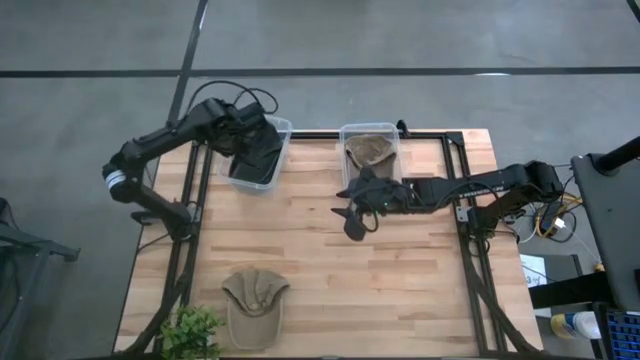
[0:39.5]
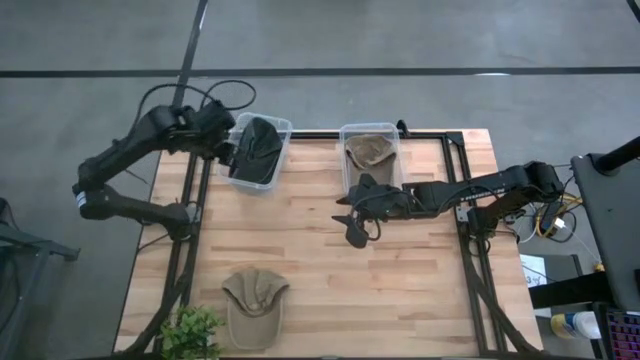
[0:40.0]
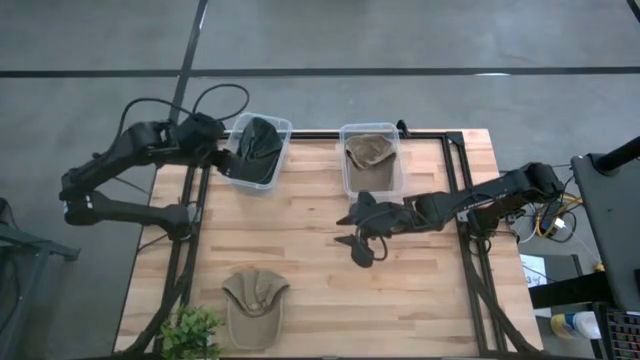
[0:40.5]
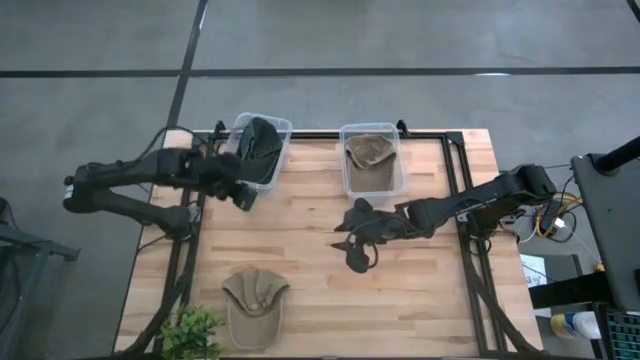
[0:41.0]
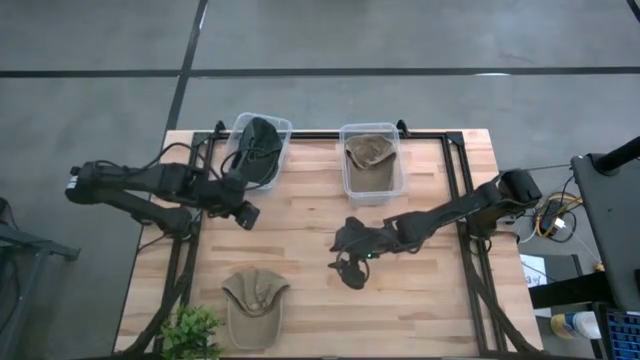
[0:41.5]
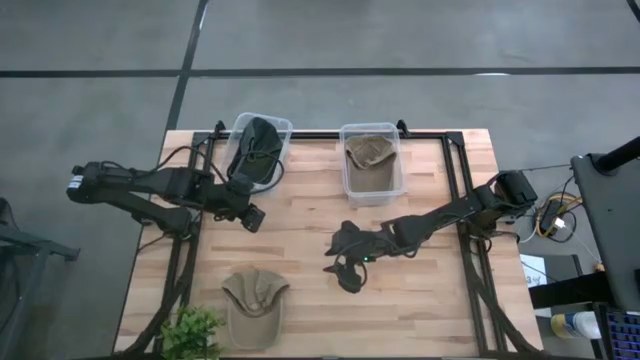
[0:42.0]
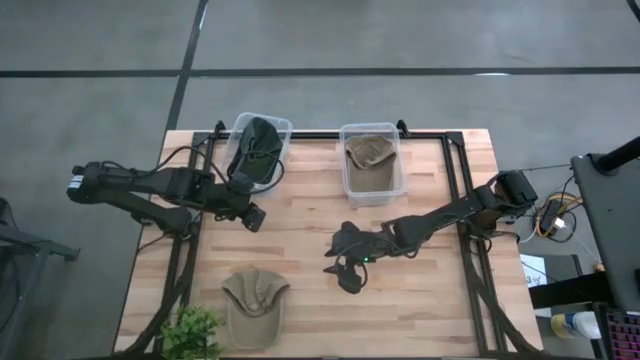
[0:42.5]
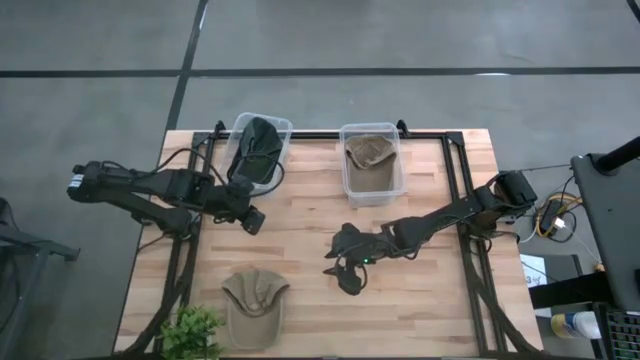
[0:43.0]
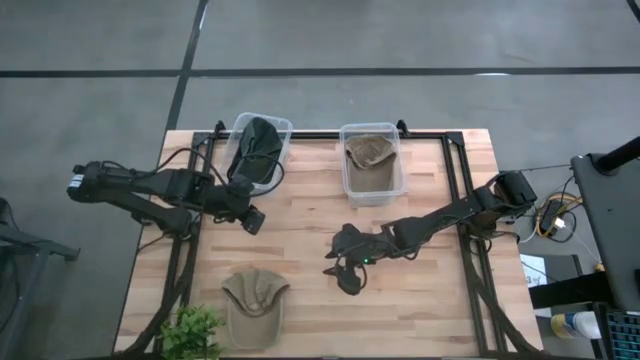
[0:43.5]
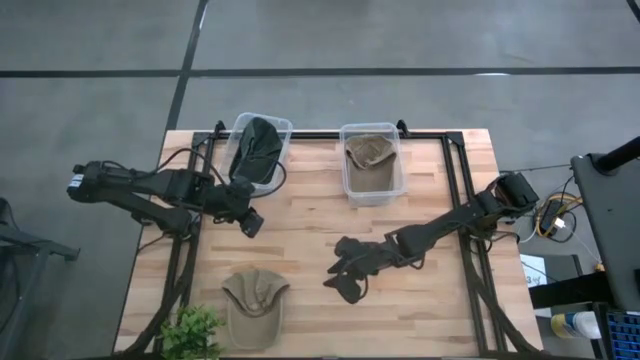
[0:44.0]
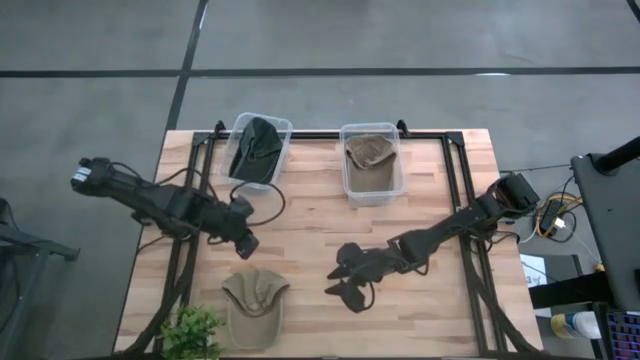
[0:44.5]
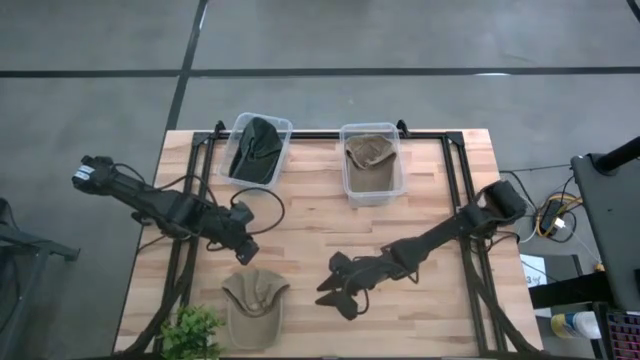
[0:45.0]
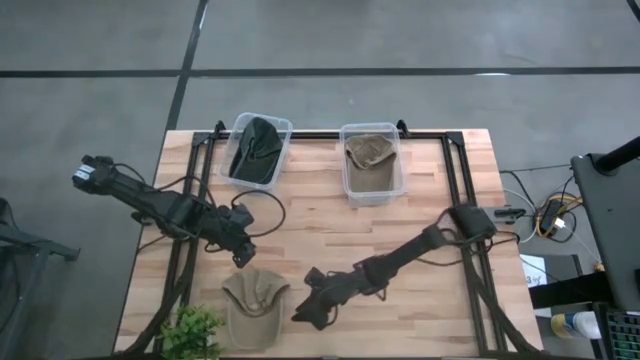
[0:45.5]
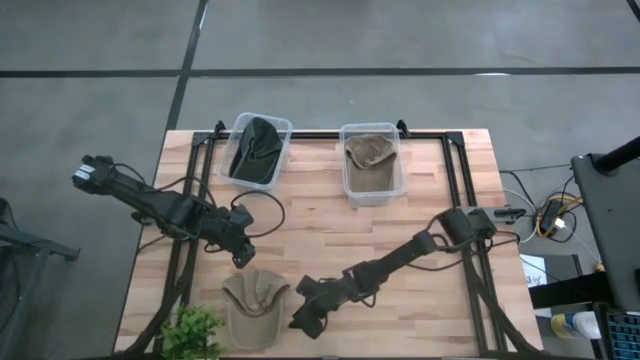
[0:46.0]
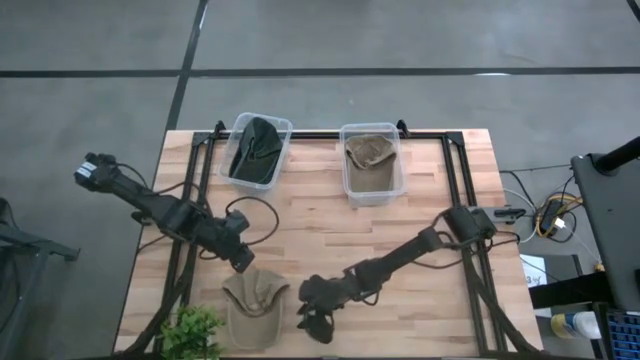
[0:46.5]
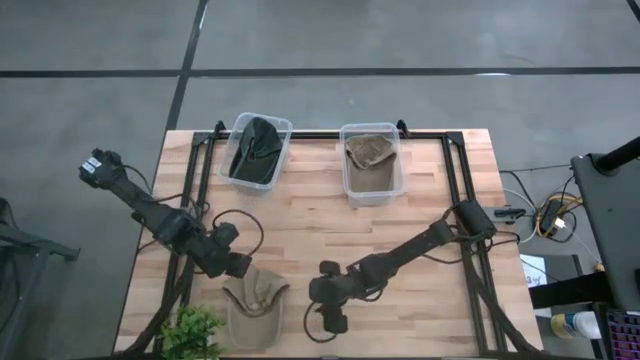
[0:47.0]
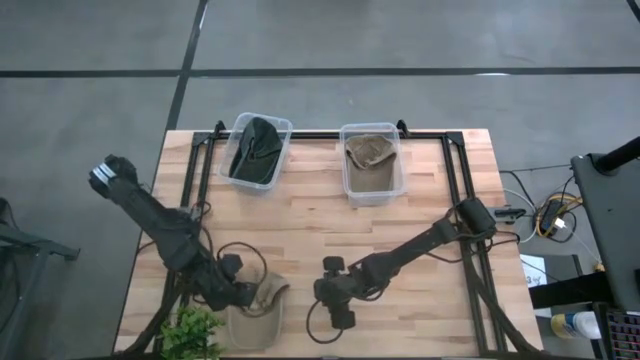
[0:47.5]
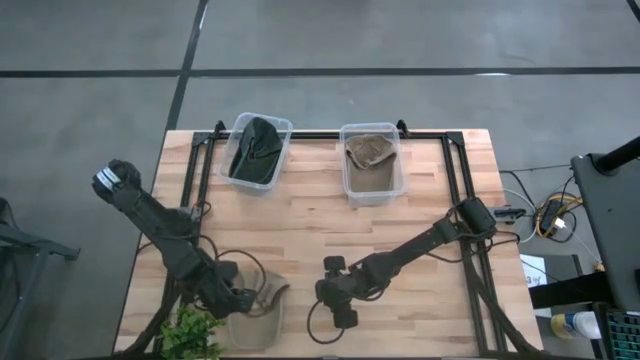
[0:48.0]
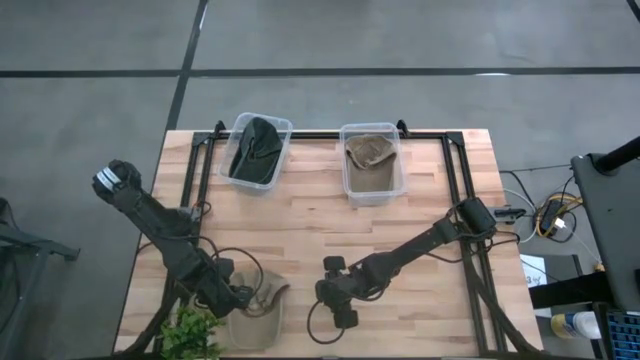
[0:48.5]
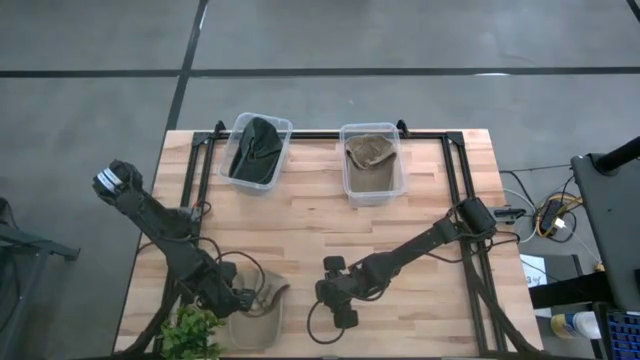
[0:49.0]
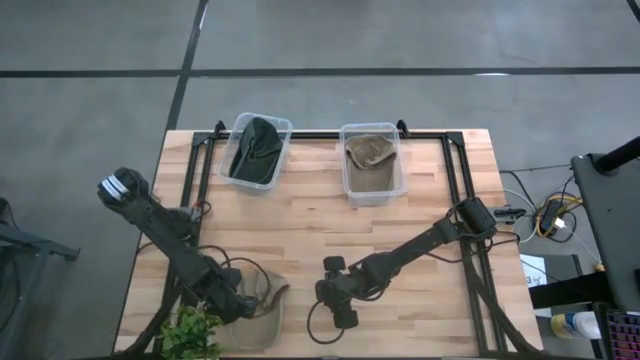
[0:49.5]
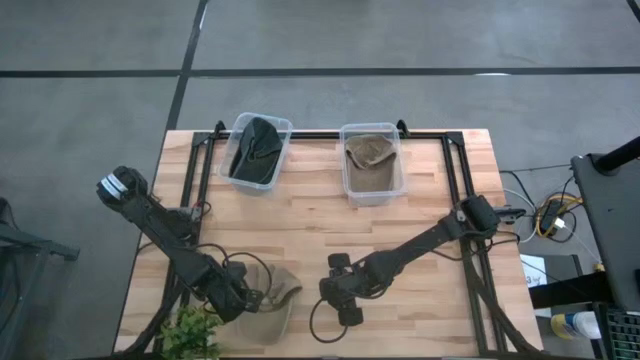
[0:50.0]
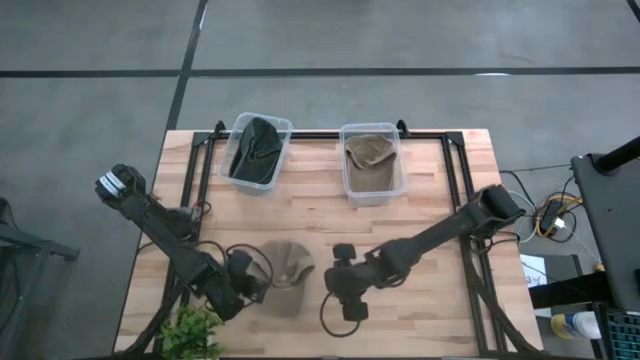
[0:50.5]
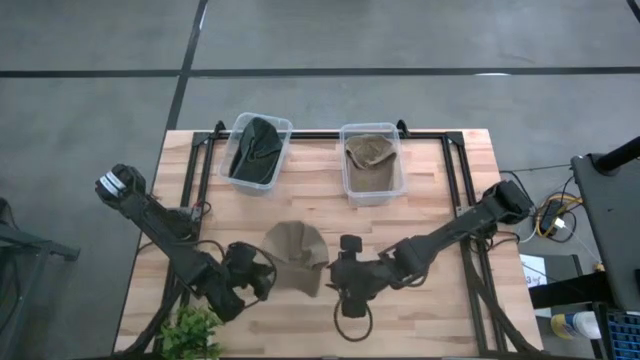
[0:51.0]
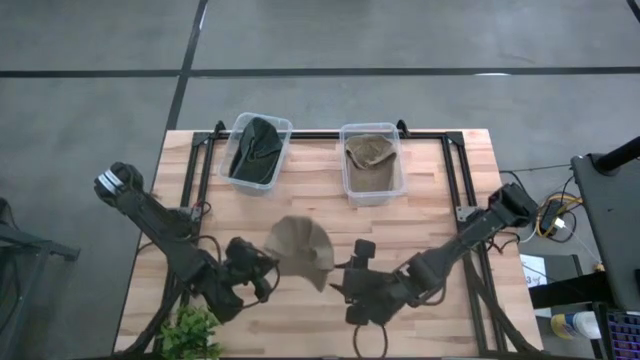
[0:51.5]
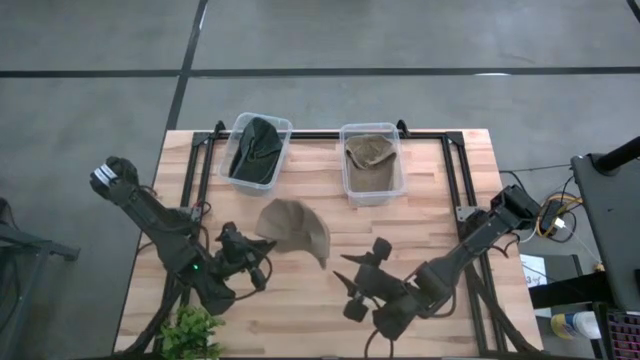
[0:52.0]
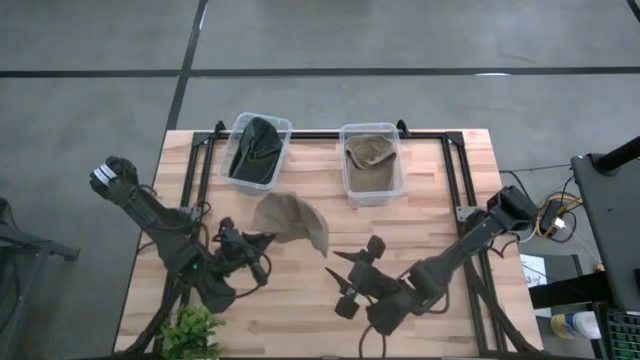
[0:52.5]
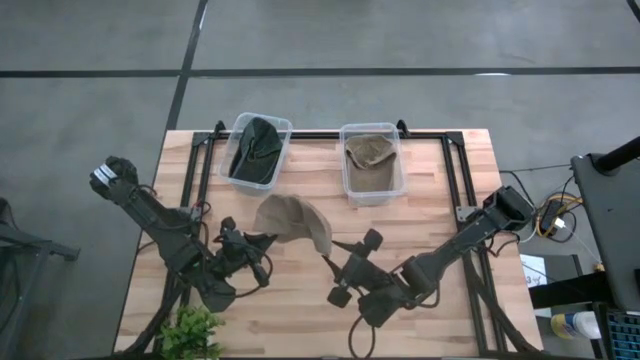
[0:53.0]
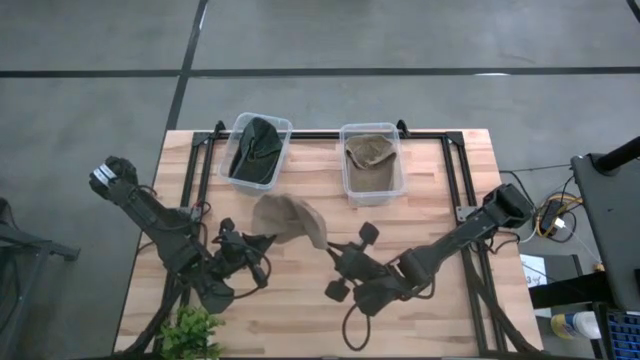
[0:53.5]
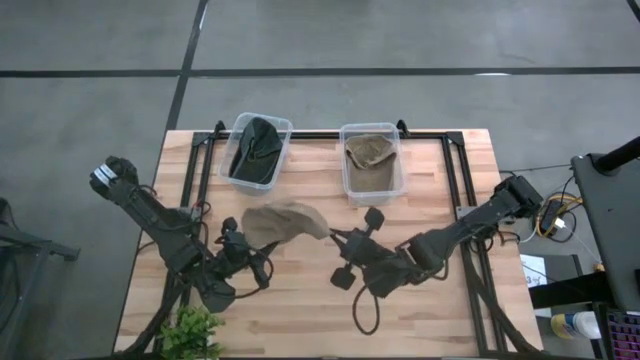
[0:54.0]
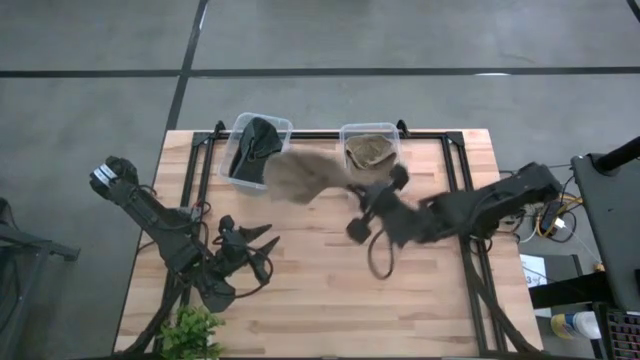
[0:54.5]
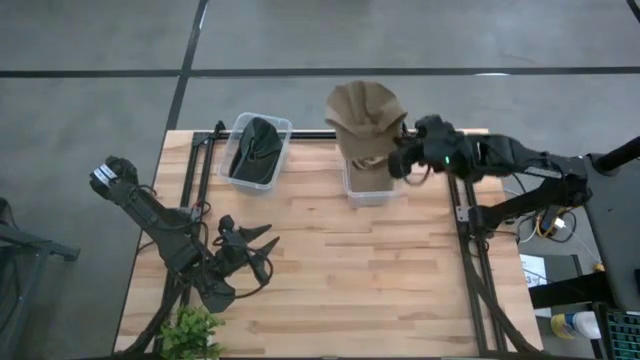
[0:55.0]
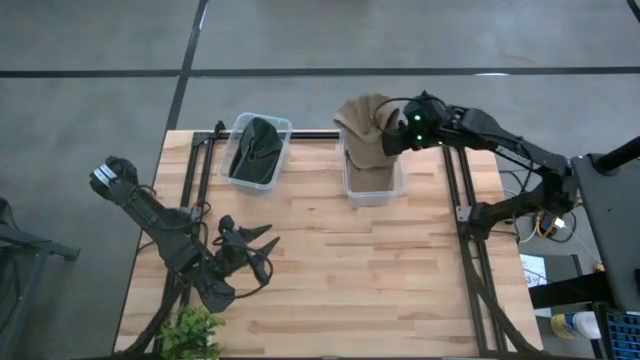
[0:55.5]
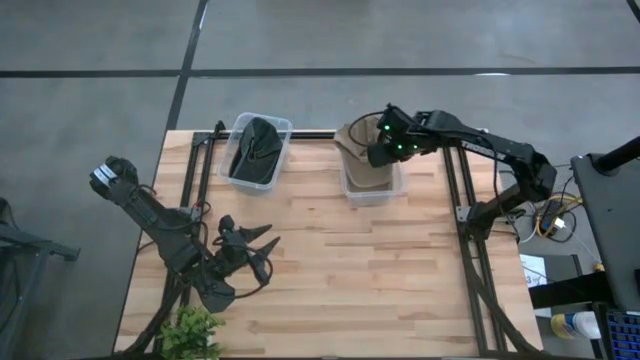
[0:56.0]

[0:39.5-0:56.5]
Task: Pick & Place hat
Put the brown cap into the right transparent bin

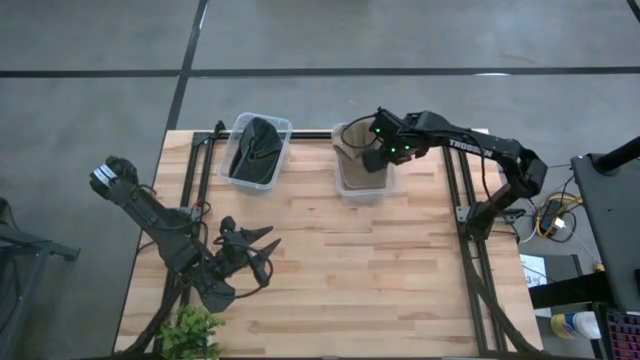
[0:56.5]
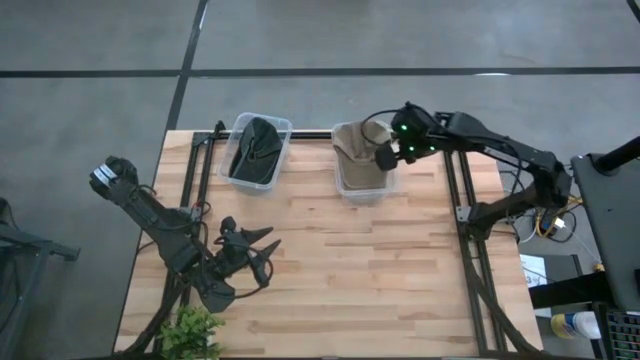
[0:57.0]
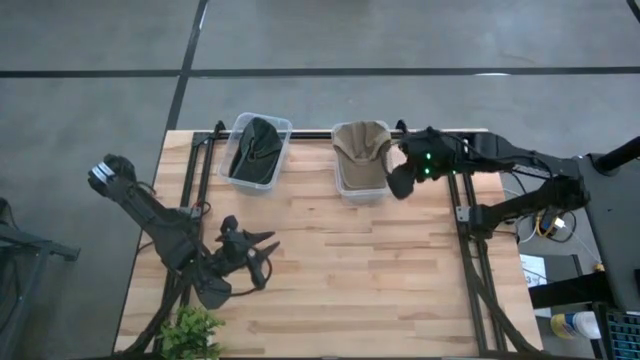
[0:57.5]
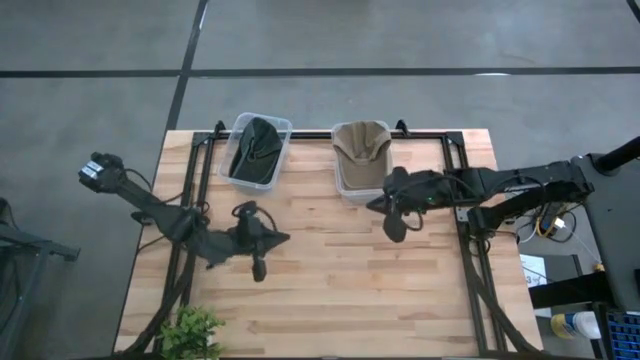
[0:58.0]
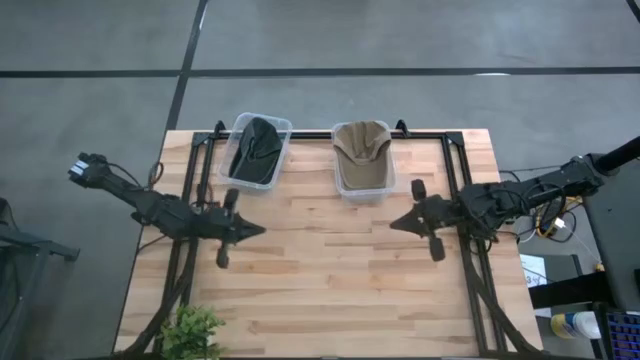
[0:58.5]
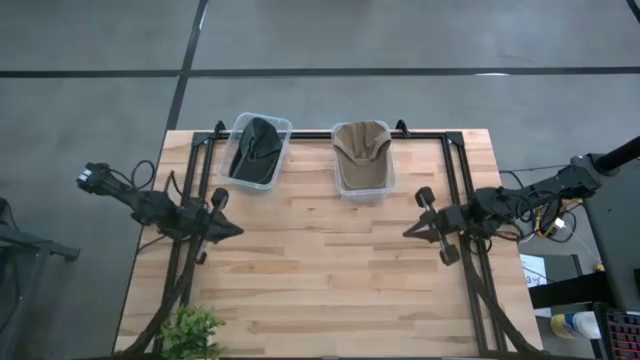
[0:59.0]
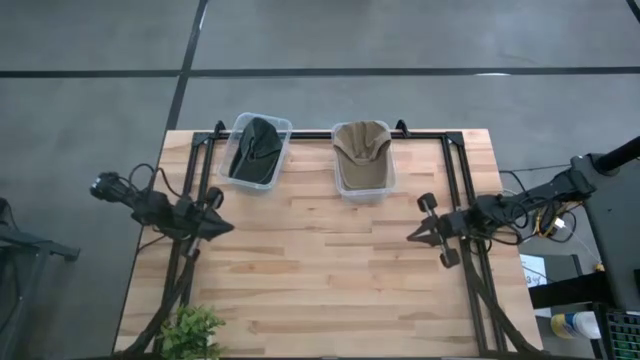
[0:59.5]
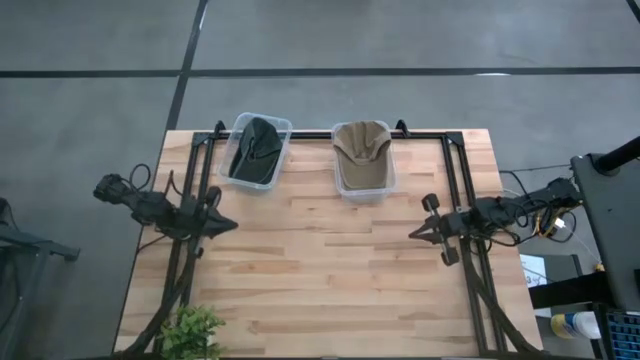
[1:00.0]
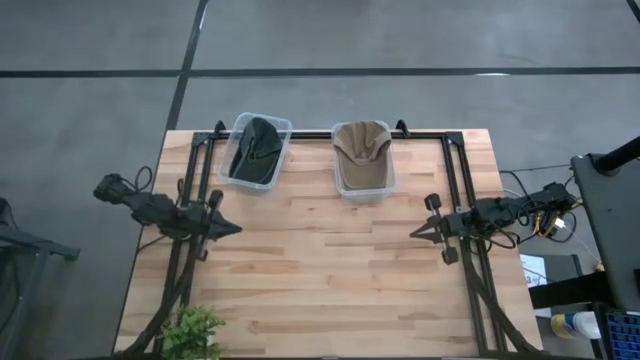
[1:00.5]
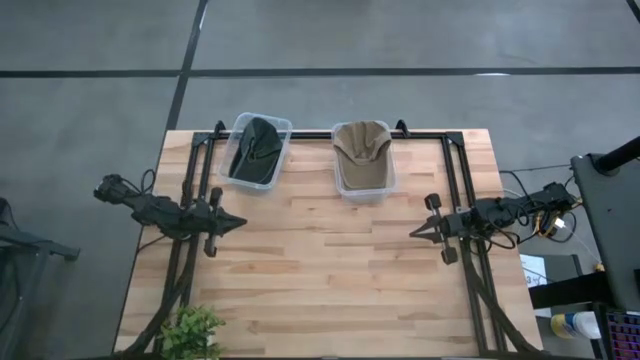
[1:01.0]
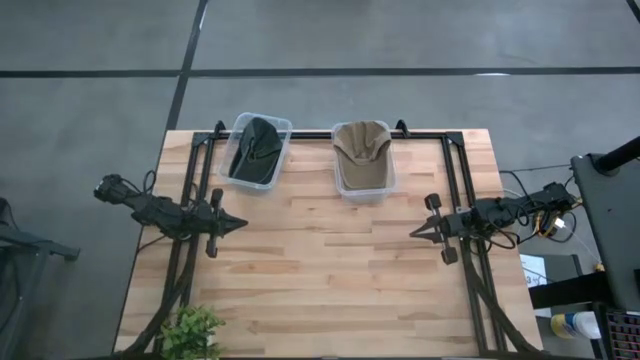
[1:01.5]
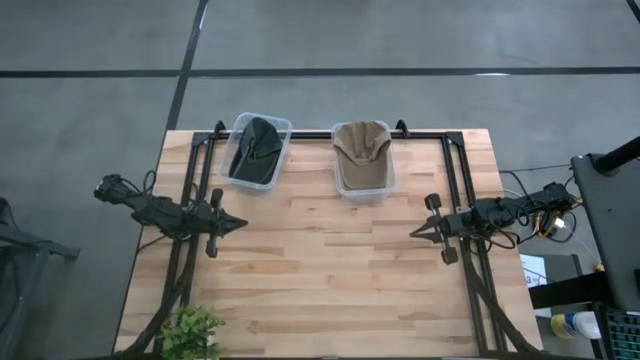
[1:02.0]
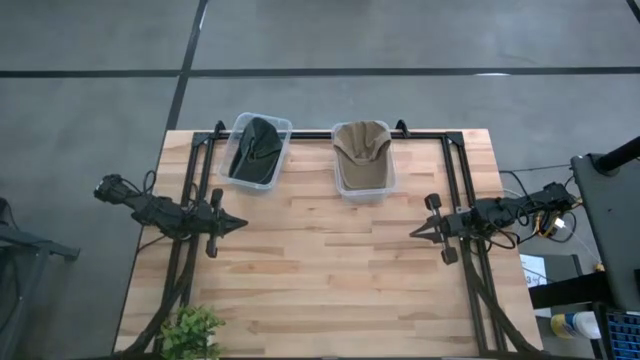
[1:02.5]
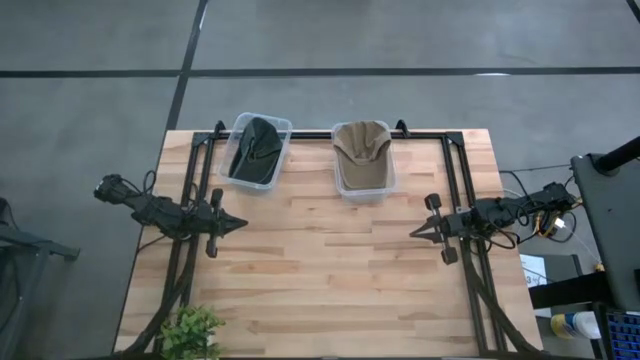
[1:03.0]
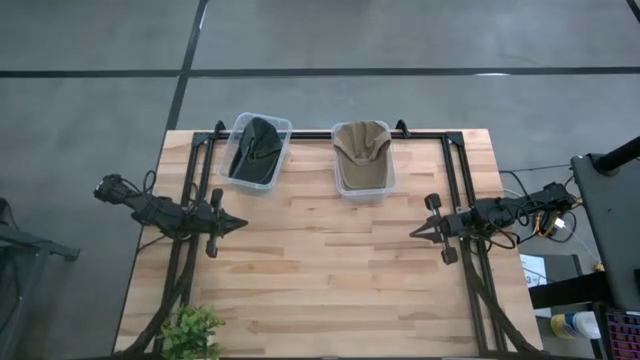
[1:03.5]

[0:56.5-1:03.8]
Return to Home Position
